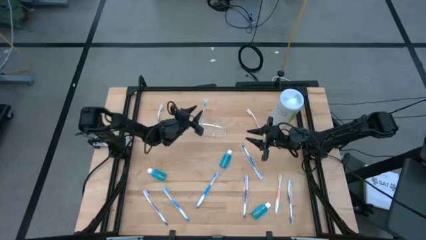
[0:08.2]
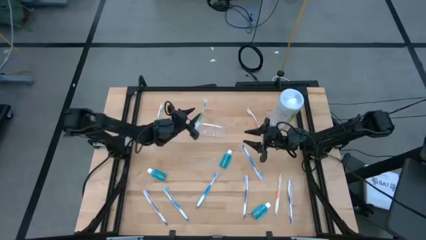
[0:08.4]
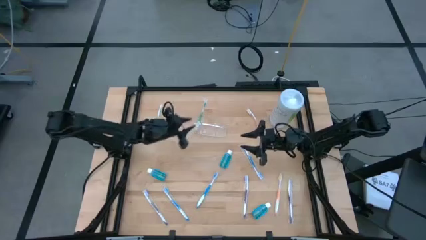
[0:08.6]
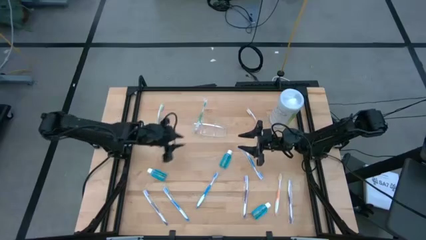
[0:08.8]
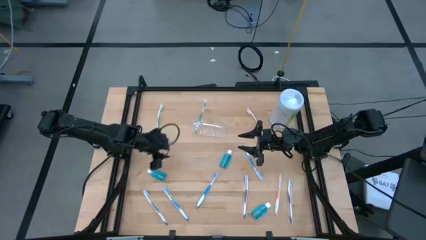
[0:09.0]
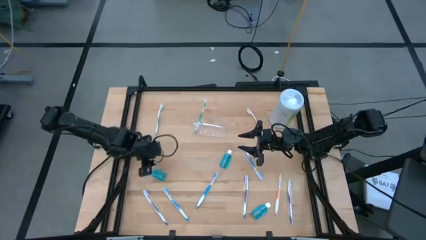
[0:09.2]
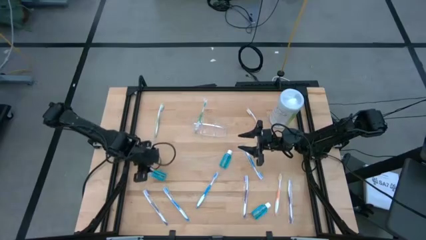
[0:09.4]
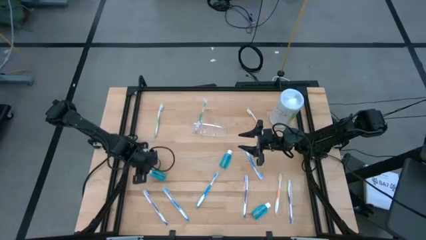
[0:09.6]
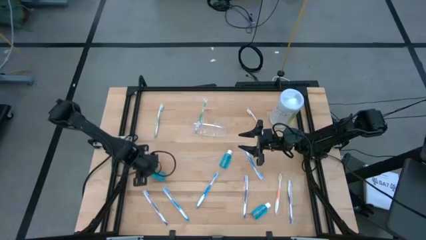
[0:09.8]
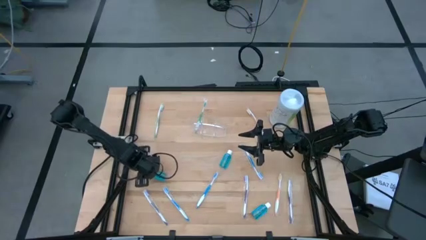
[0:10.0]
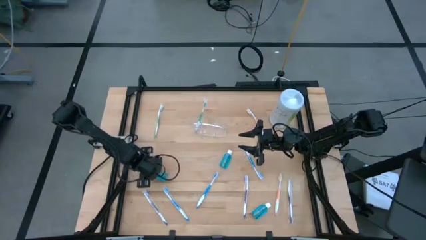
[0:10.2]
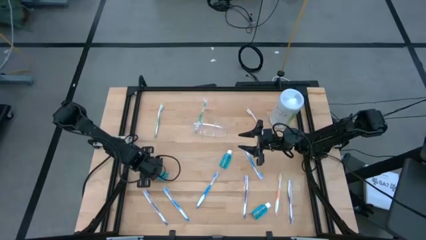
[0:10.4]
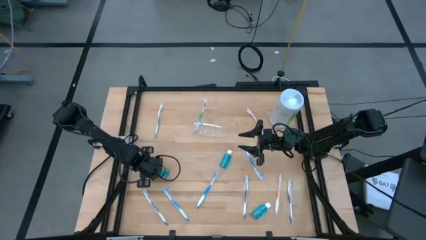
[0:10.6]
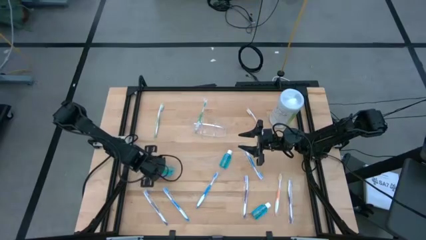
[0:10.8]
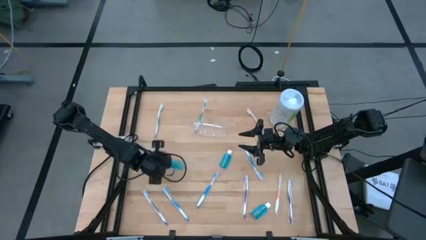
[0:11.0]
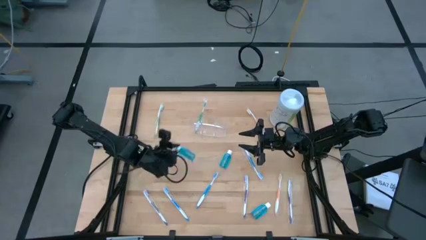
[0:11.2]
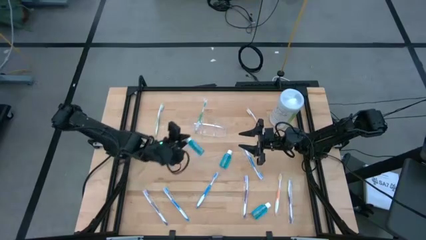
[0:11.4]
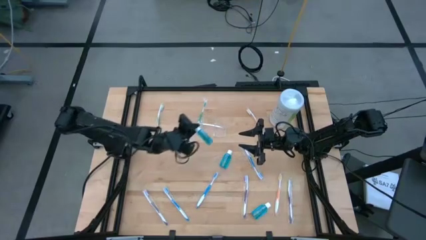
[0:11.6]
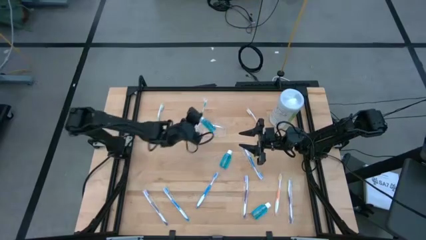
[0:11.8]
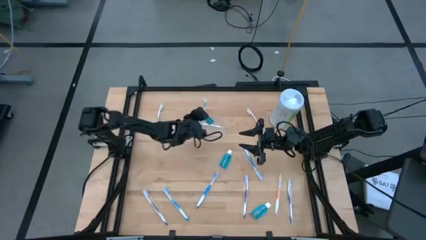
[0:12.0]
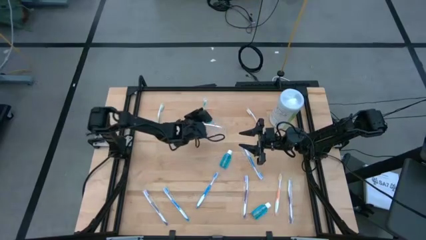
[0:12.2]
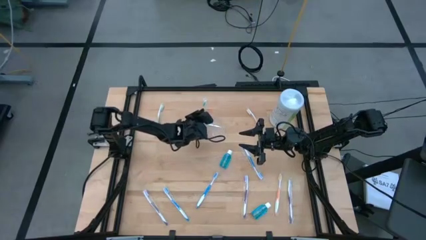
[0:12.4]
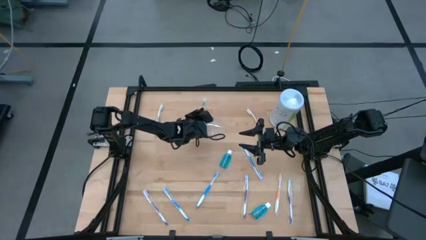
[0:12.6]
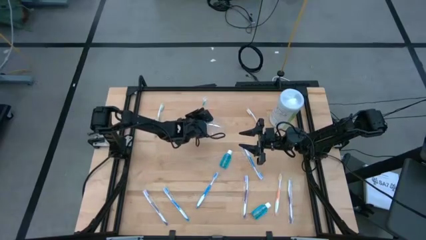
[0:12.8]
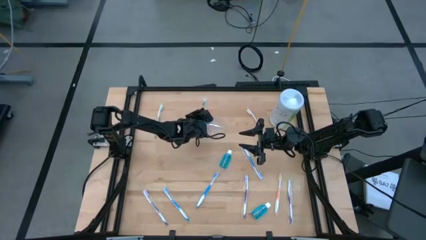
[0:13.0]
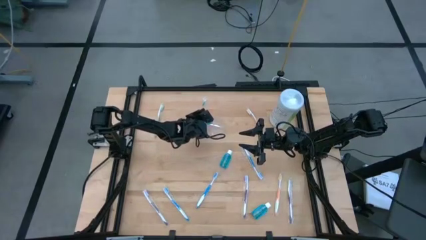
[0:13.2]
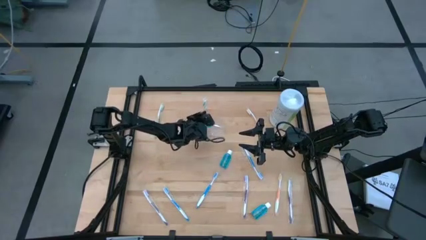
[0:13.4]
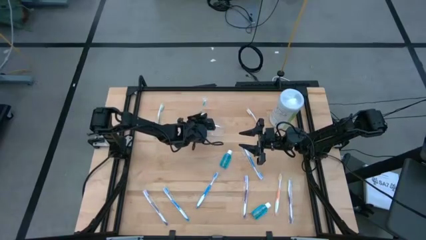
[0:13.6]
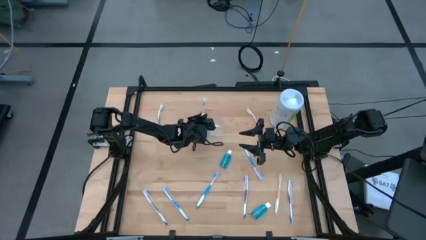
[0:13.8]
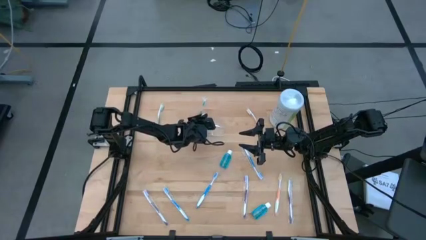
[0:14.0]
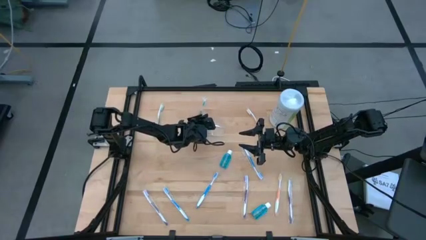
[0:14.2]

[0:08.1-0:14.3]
Task: Pick & Place toothbrushing station
Put the blue mouthwash into the middle section of the transparent organizer

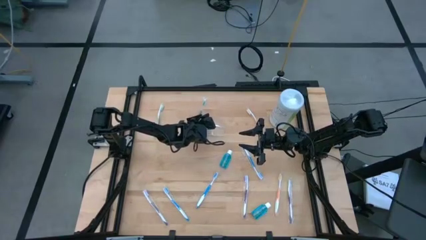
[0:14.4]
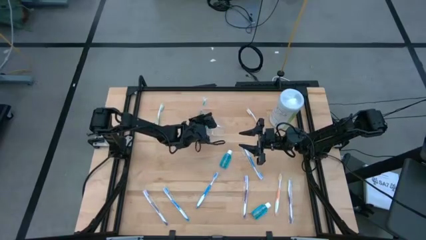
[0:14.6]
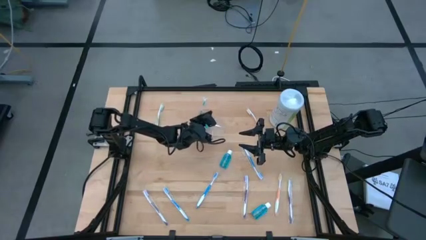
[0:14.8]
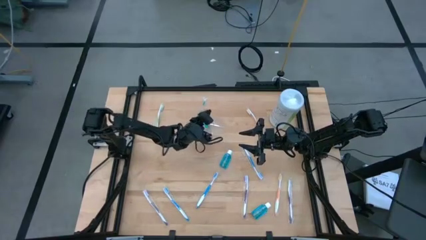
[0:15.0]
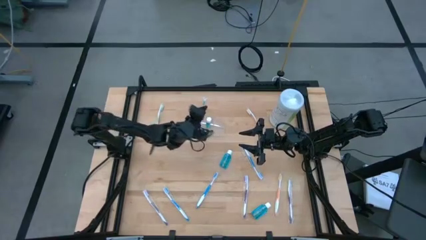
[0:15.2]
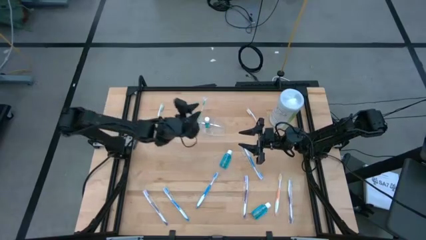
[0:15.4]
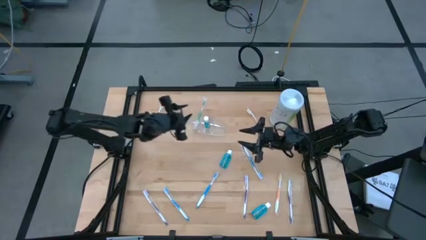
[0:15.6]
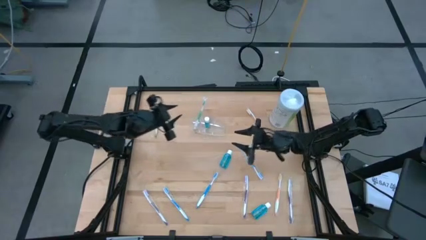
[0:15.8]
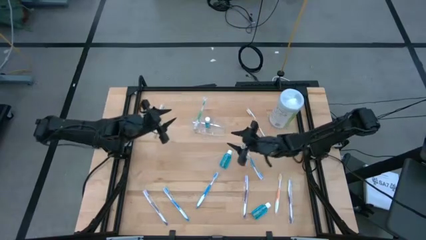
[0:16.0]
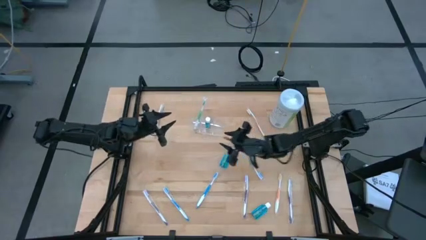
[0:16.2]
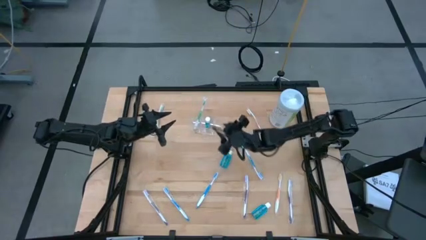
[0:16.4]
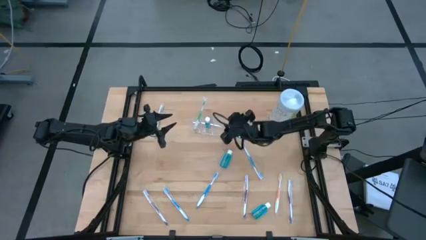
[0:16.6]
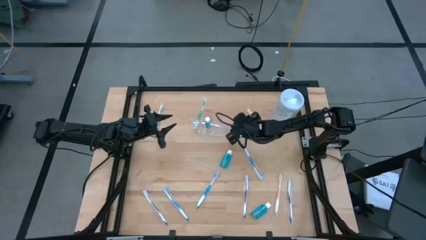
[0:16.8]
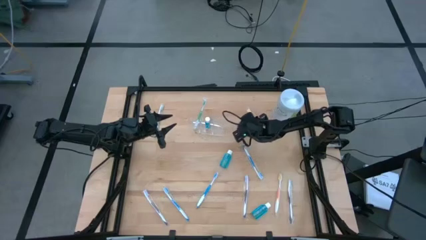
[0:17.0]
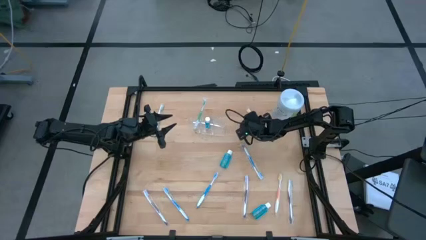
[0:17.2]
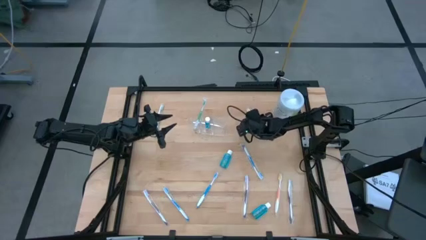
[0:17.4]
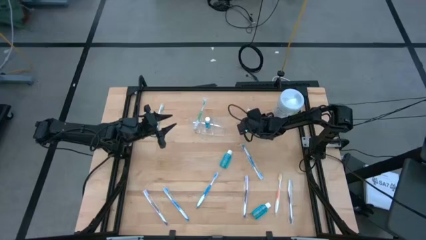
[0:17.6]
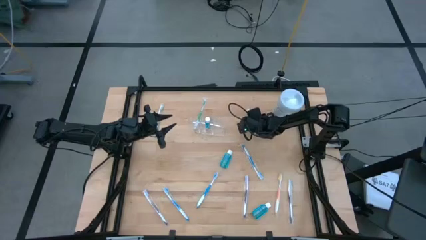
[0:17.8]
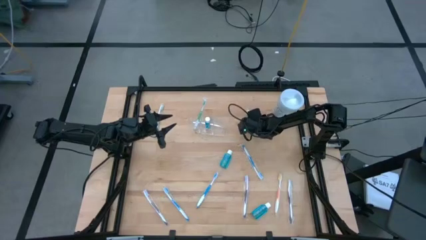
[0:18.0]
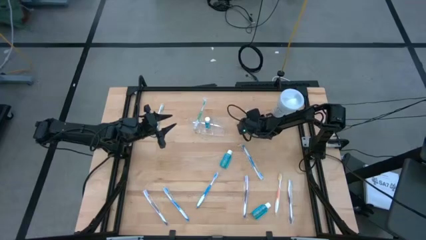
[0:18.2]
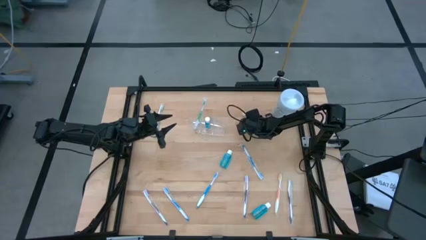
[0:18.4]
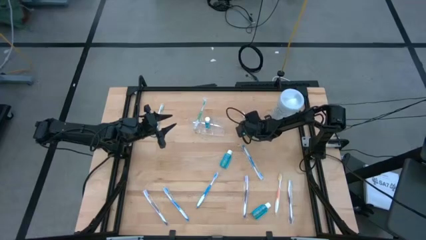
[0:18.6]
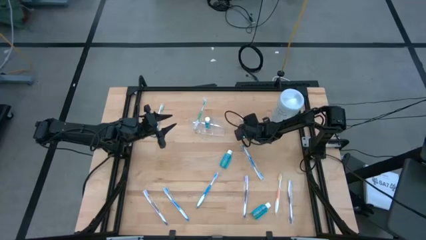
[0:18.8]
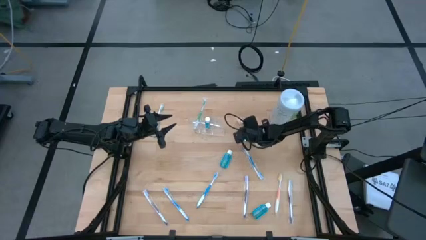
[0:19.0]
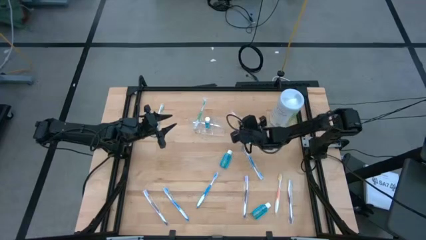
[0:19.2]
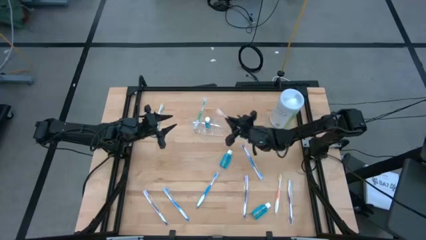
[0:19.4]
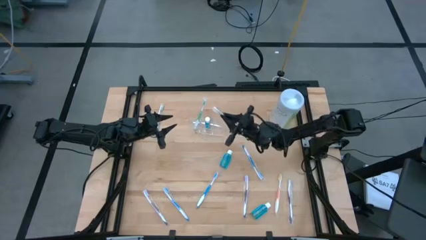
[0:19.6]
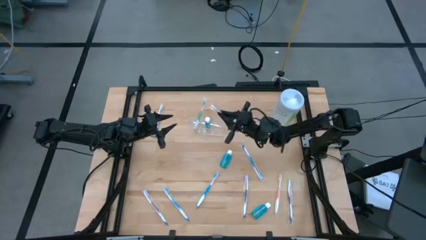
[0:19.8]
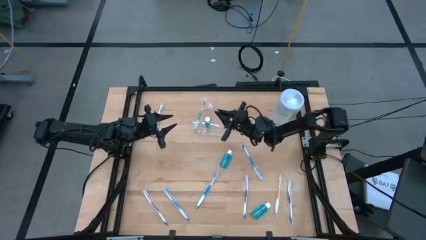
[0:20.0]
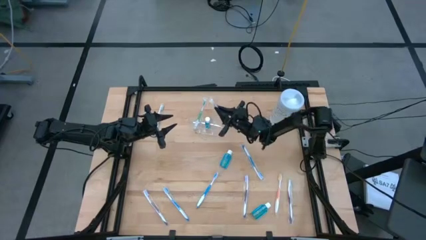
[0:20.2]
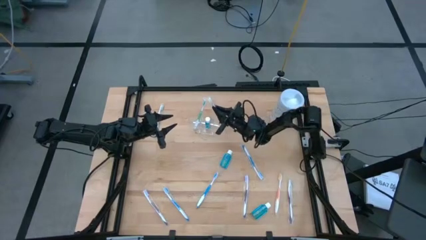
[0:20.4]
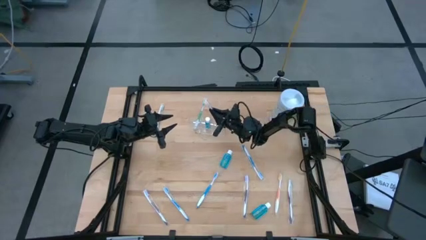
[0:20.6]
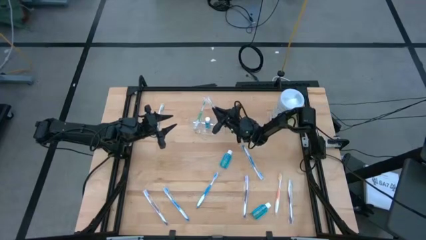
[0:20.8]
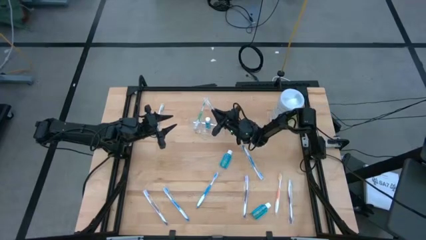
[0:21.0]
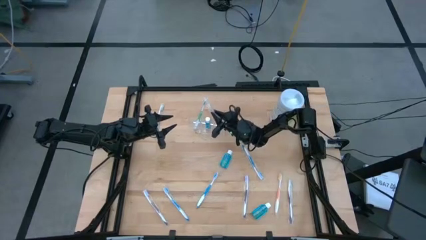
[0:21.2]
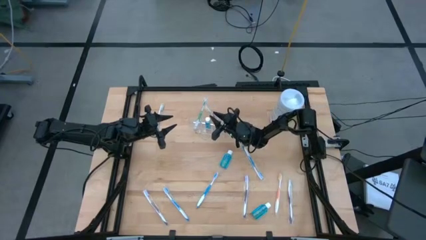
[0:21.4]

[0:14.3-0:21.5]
Put the orange toothbrush into the right section of the transparent organizer

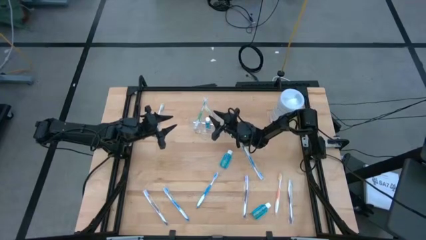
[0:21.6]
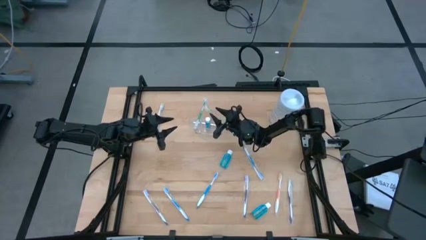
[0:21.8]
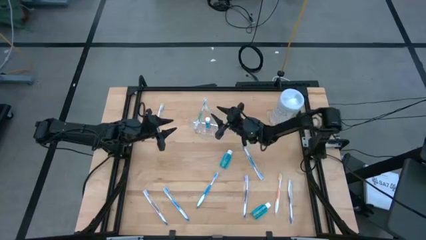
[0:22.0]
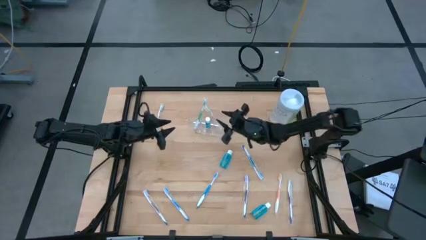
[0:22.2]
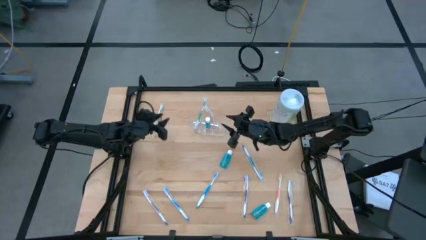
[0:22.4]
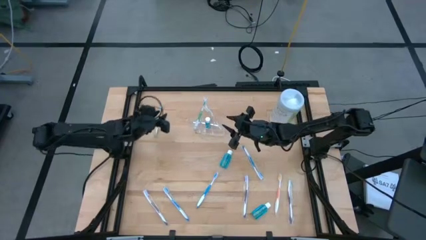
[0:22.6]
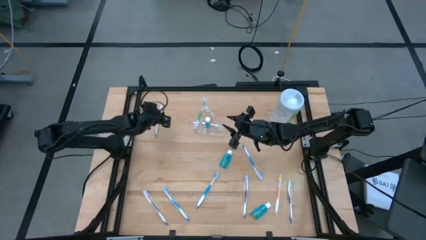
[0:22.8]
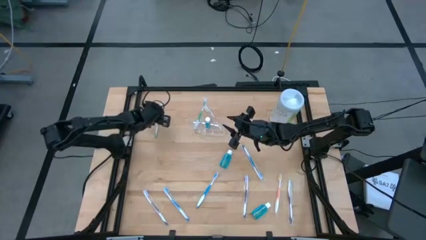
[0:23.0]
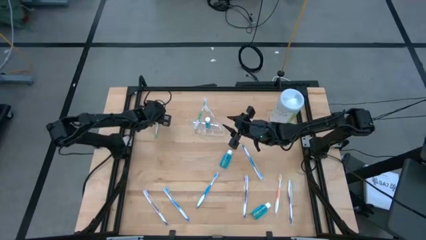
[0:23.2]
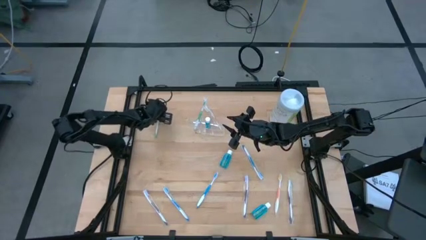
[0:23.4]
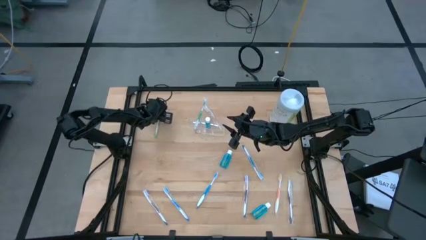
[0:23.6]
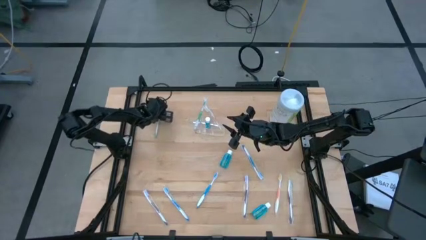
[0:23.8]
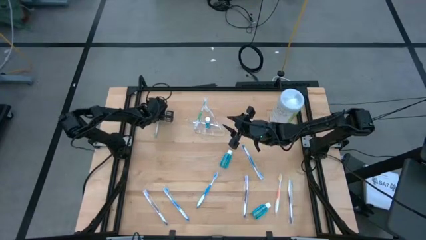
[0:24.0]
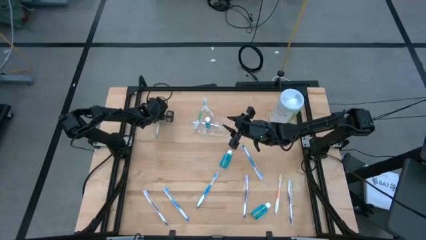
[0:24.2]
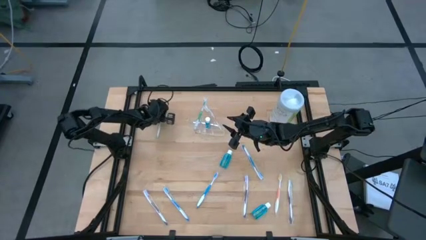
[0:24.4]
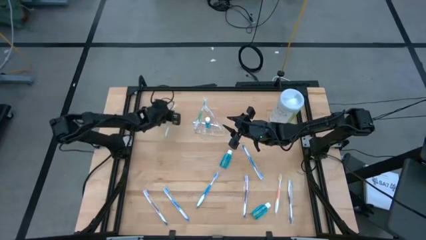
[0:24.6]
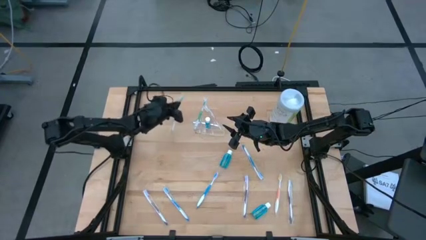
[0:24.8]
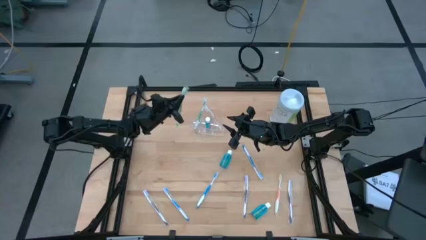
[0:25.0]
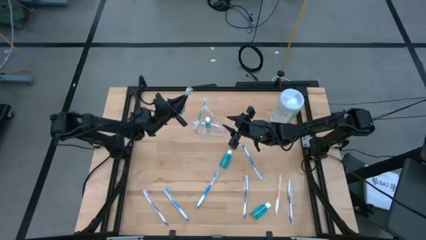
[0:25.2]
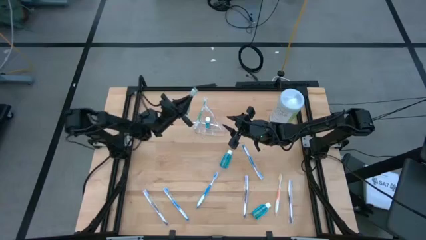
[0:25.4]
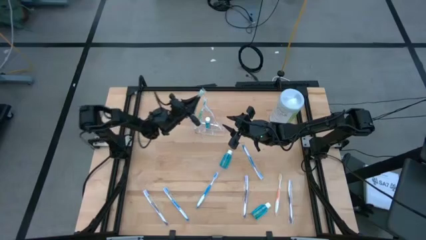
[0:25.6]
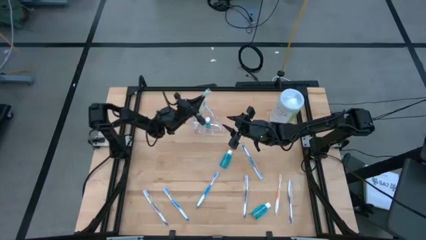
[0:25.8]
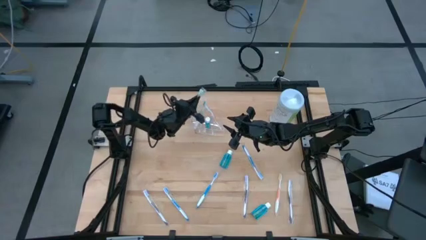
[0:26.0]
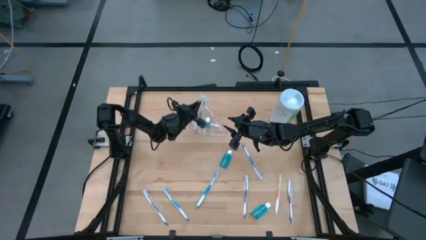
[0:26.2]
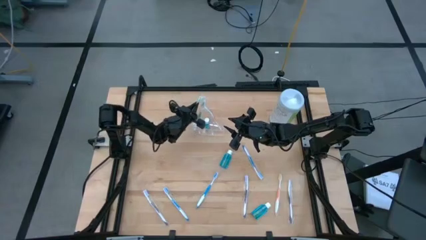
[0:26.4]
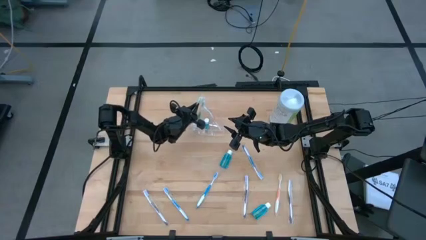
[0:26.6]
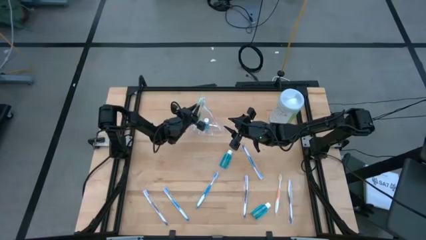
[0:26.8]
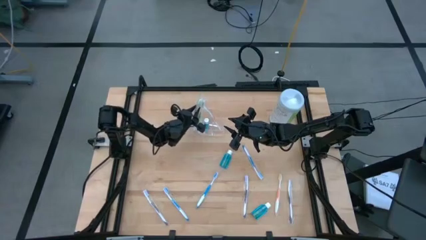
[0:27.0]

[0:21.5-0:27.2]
Put the green toothbrush into the left section of the transparent organizer
